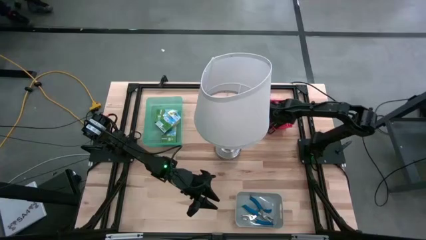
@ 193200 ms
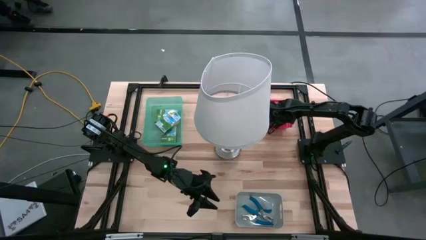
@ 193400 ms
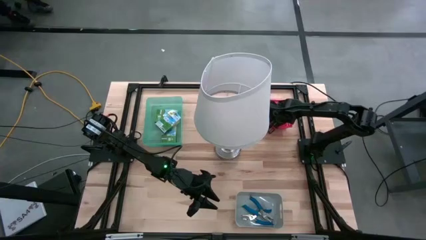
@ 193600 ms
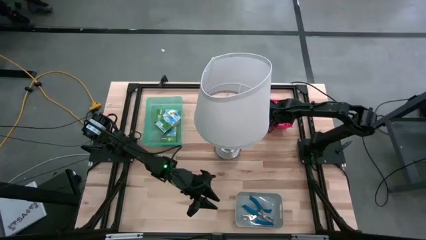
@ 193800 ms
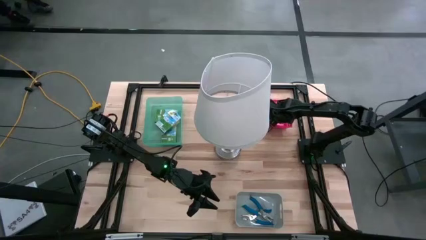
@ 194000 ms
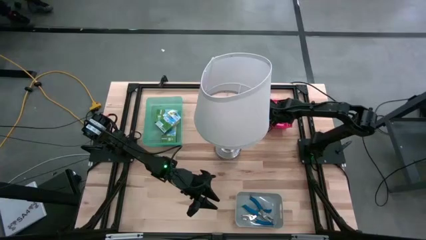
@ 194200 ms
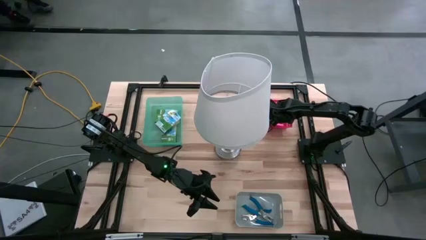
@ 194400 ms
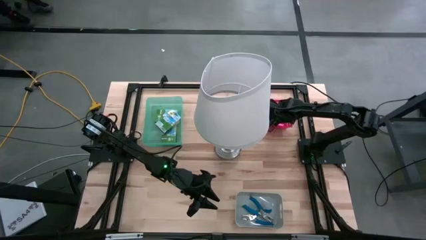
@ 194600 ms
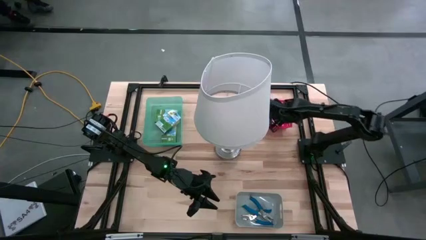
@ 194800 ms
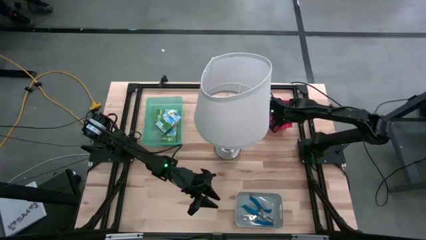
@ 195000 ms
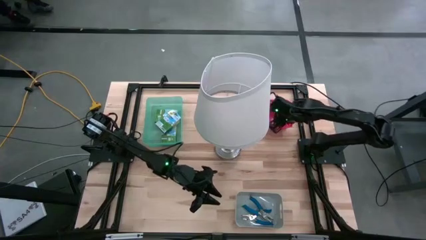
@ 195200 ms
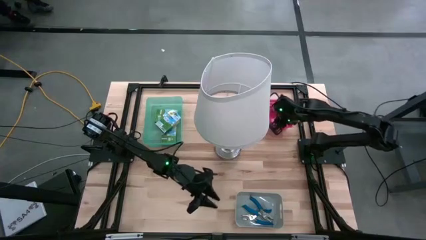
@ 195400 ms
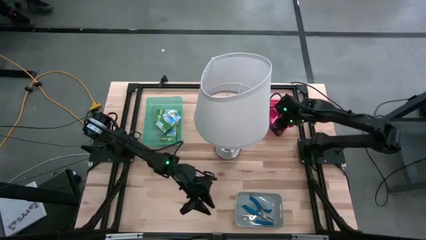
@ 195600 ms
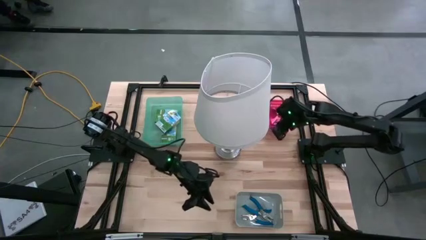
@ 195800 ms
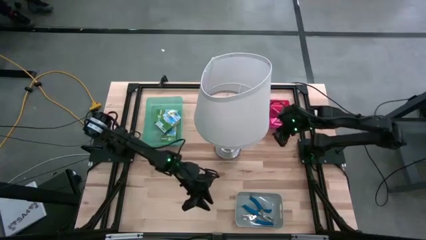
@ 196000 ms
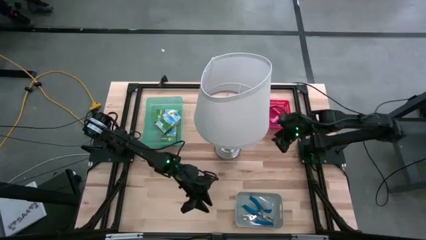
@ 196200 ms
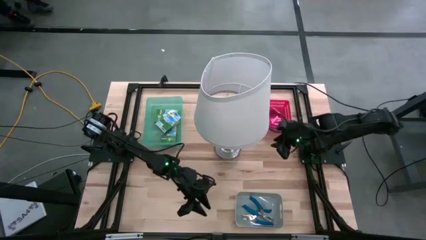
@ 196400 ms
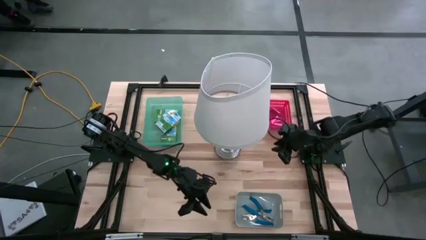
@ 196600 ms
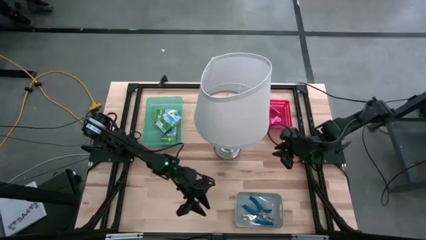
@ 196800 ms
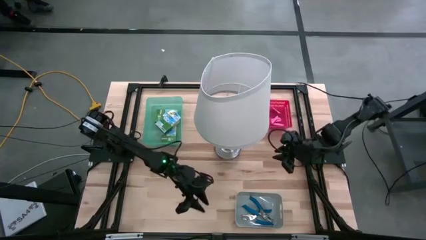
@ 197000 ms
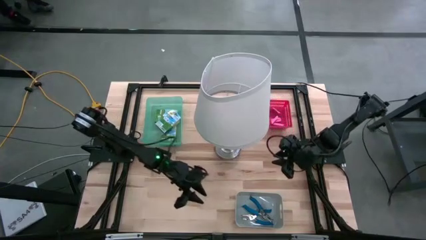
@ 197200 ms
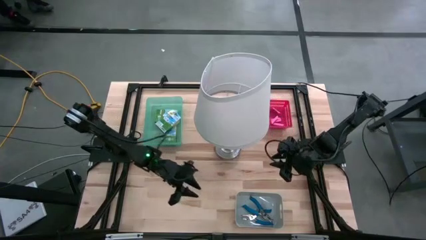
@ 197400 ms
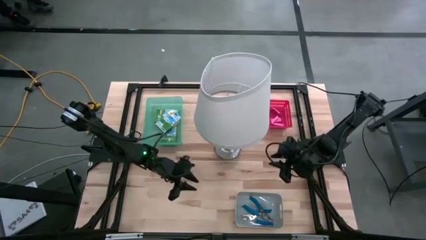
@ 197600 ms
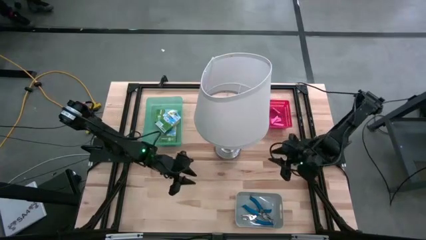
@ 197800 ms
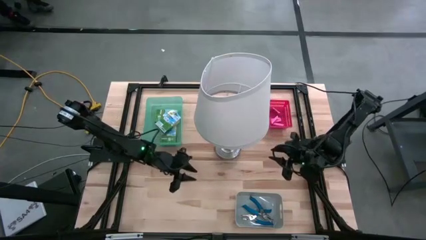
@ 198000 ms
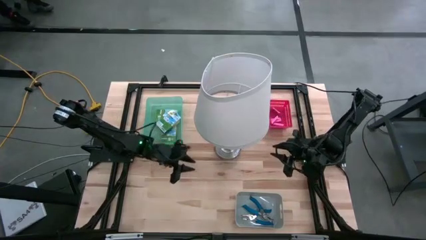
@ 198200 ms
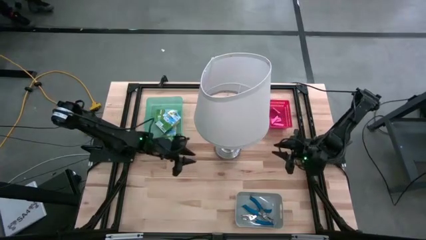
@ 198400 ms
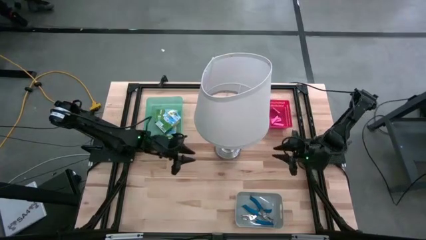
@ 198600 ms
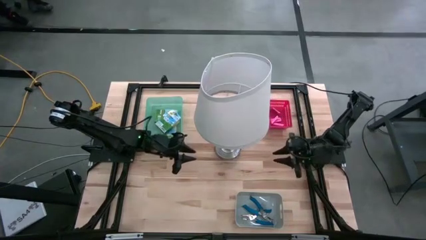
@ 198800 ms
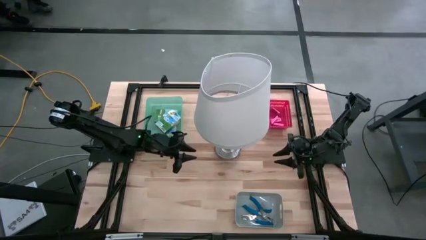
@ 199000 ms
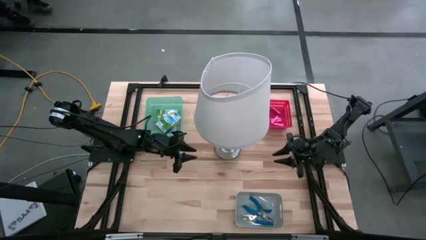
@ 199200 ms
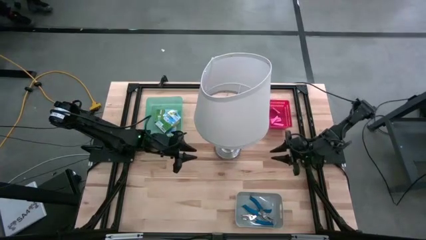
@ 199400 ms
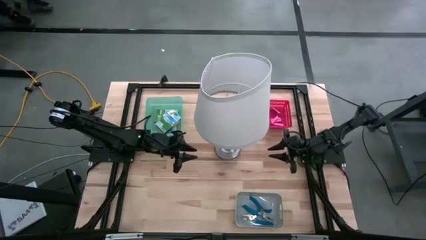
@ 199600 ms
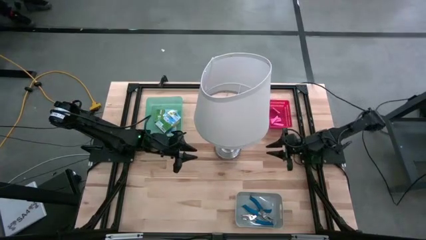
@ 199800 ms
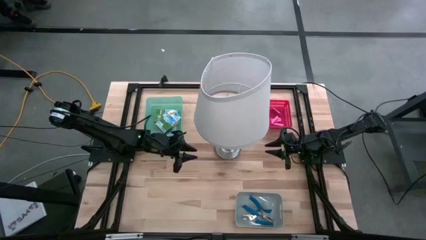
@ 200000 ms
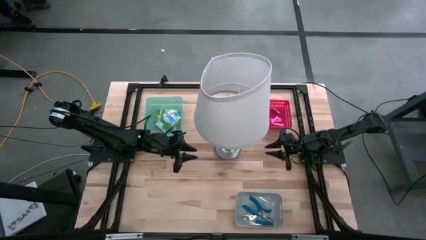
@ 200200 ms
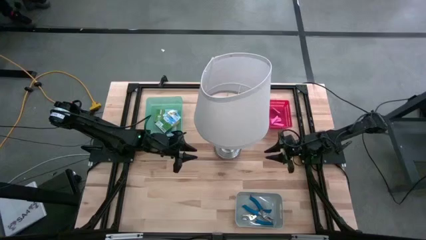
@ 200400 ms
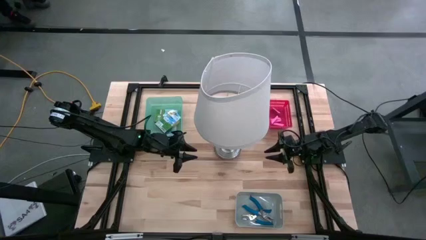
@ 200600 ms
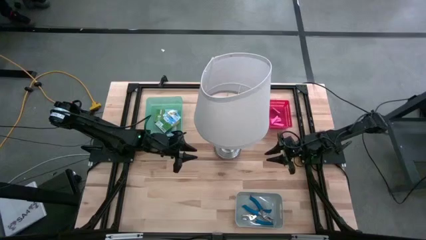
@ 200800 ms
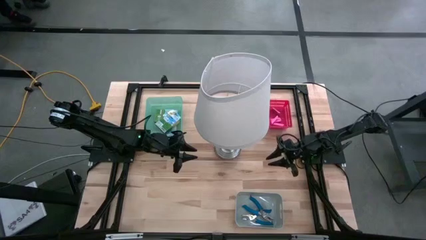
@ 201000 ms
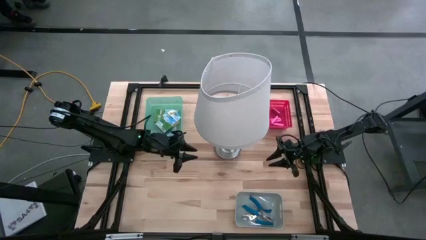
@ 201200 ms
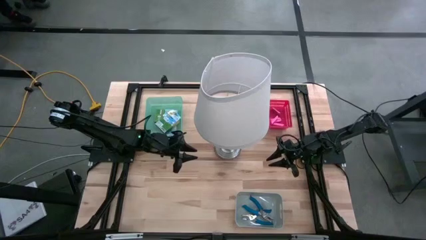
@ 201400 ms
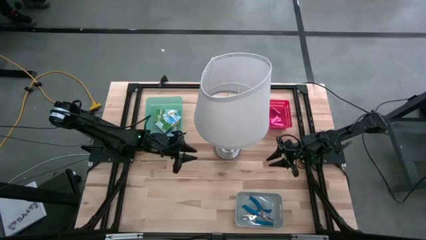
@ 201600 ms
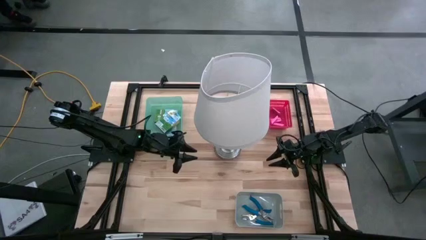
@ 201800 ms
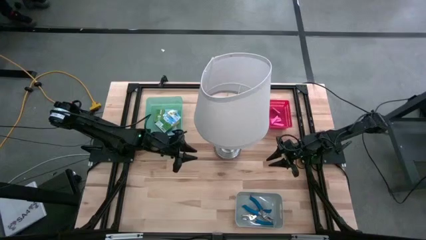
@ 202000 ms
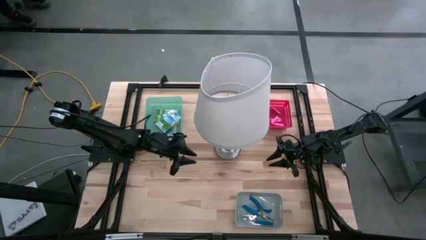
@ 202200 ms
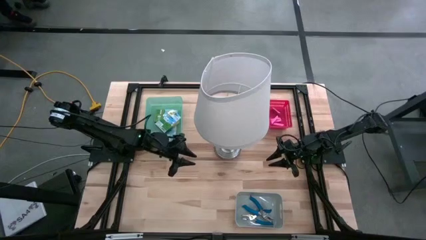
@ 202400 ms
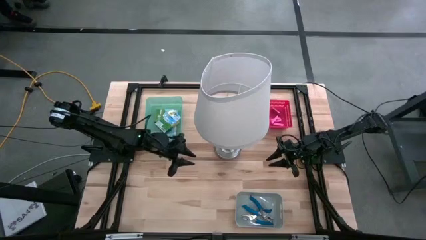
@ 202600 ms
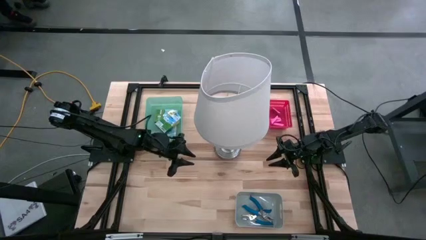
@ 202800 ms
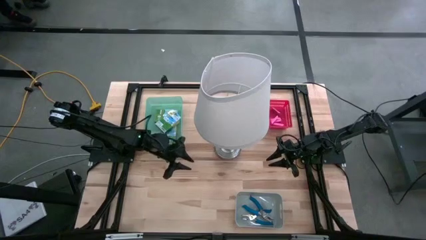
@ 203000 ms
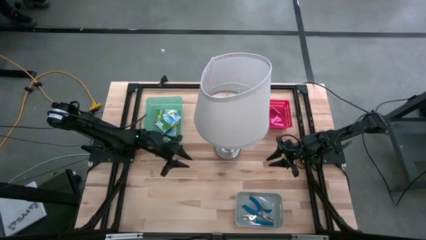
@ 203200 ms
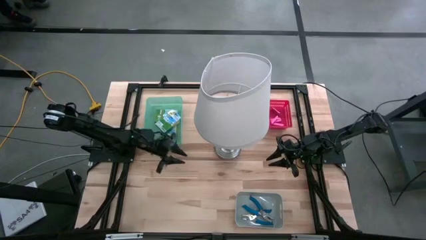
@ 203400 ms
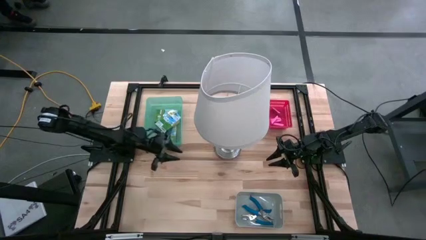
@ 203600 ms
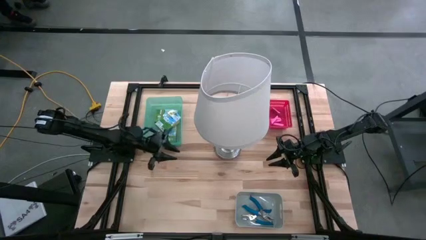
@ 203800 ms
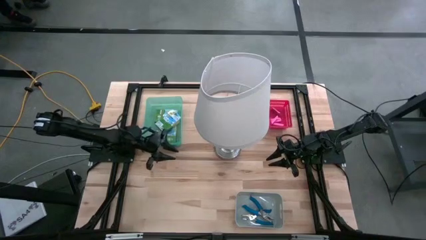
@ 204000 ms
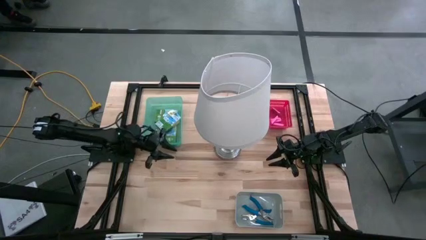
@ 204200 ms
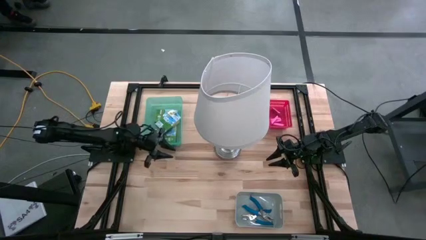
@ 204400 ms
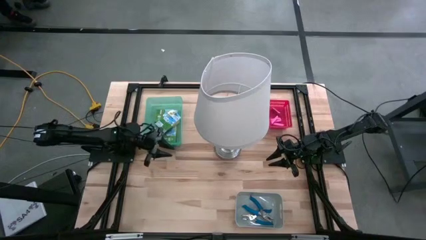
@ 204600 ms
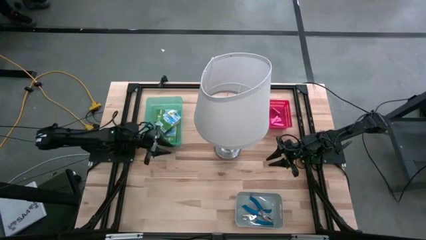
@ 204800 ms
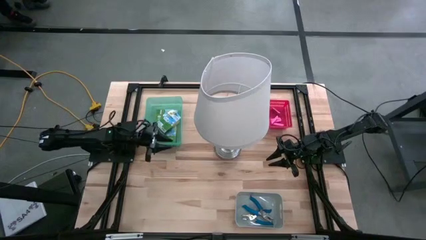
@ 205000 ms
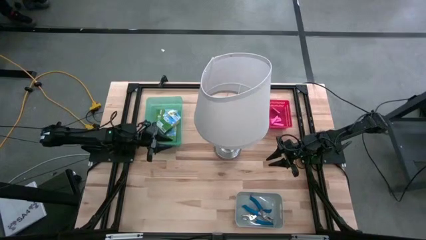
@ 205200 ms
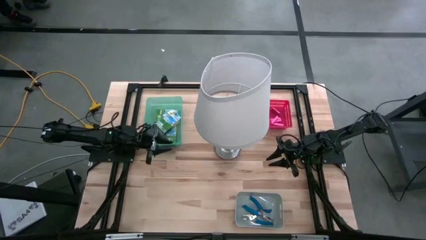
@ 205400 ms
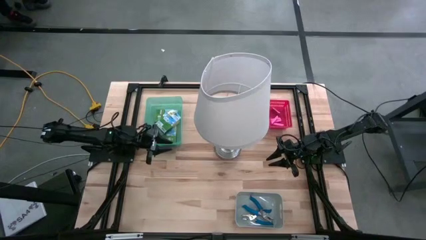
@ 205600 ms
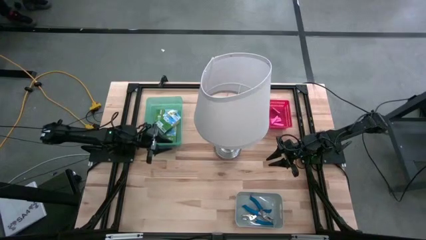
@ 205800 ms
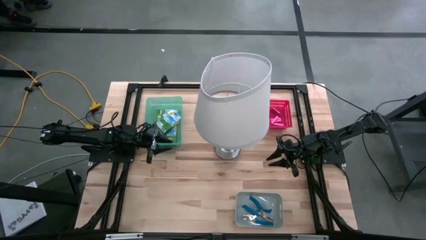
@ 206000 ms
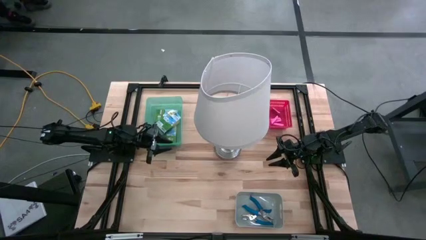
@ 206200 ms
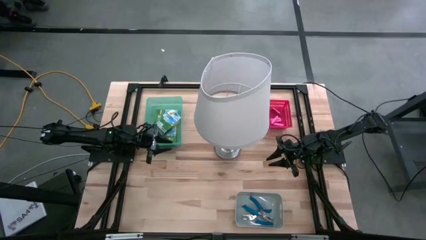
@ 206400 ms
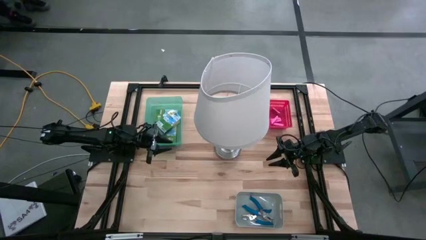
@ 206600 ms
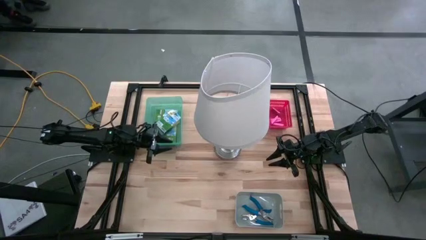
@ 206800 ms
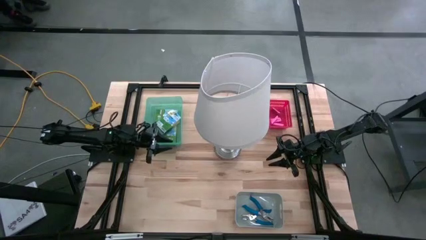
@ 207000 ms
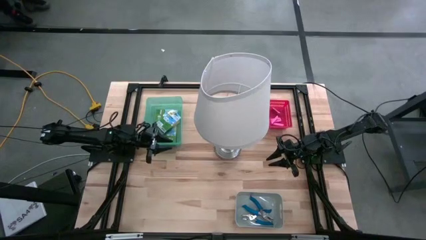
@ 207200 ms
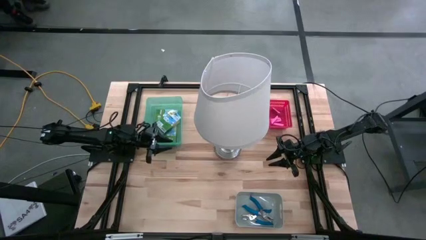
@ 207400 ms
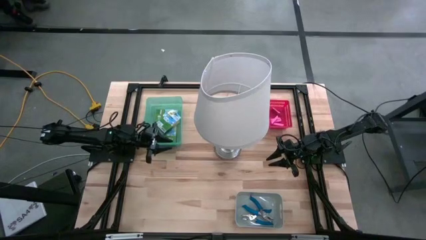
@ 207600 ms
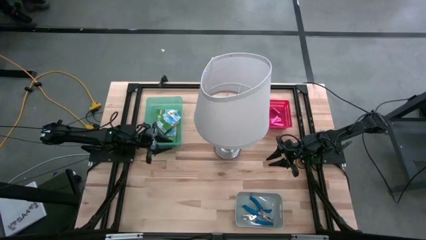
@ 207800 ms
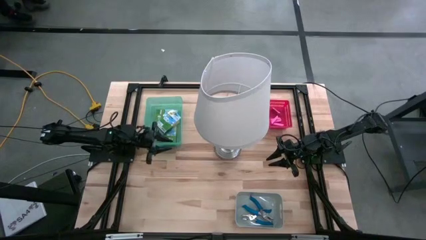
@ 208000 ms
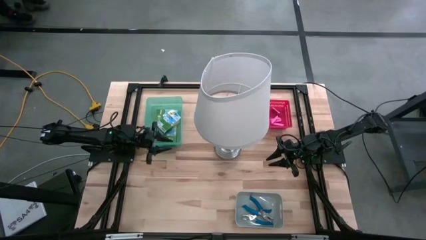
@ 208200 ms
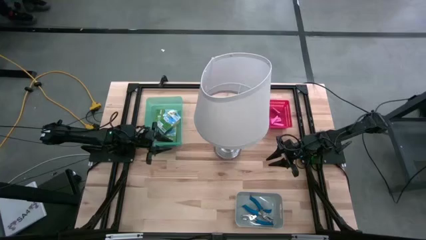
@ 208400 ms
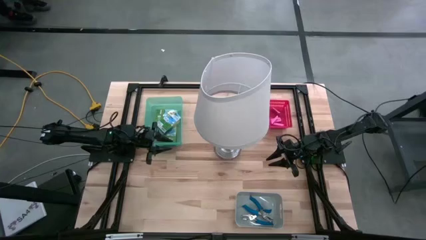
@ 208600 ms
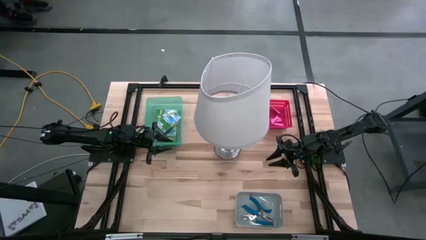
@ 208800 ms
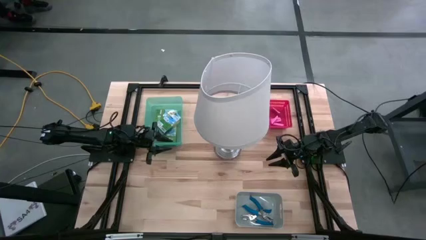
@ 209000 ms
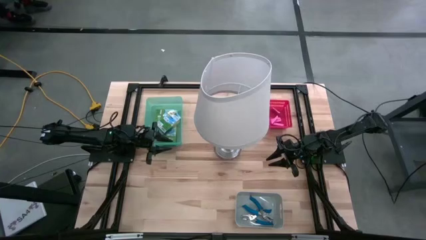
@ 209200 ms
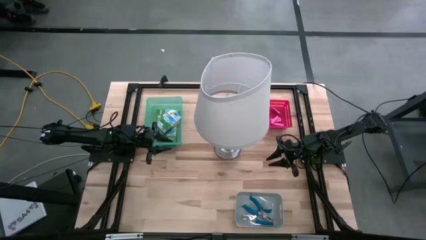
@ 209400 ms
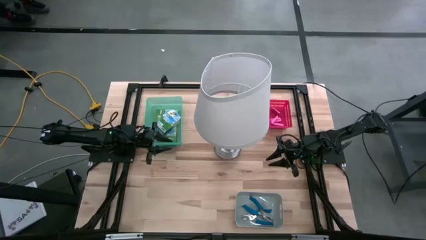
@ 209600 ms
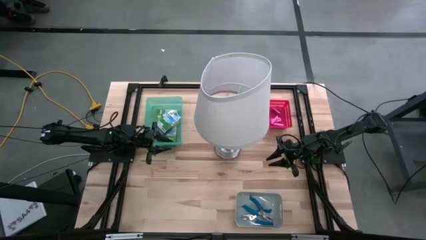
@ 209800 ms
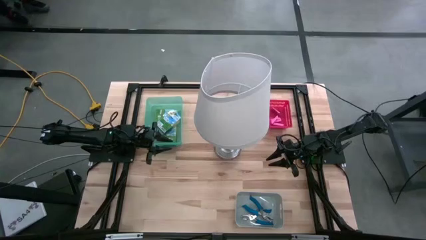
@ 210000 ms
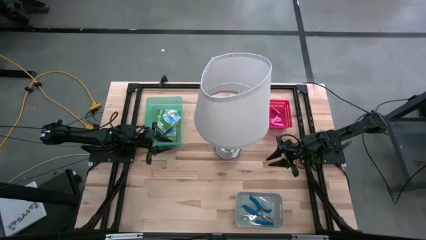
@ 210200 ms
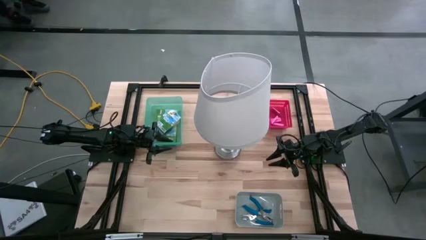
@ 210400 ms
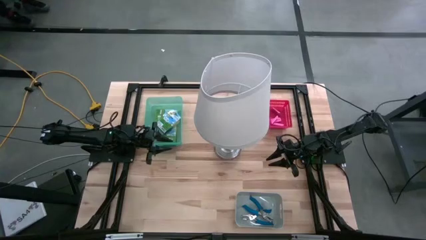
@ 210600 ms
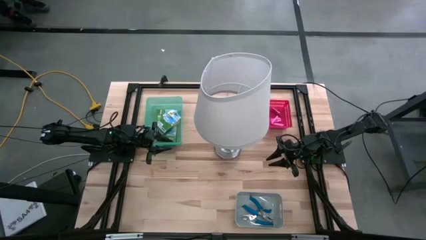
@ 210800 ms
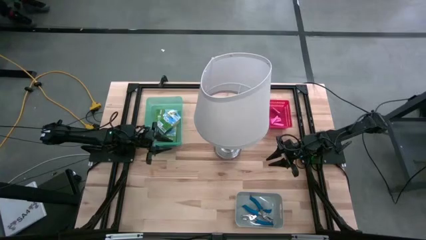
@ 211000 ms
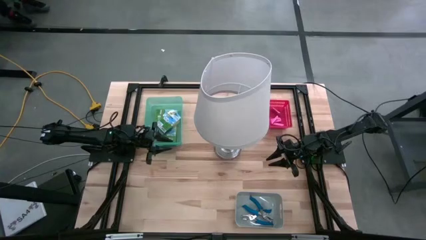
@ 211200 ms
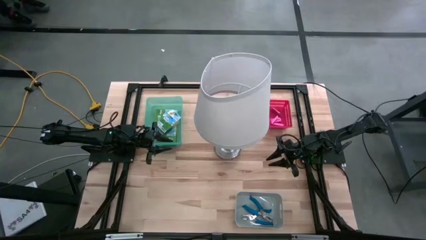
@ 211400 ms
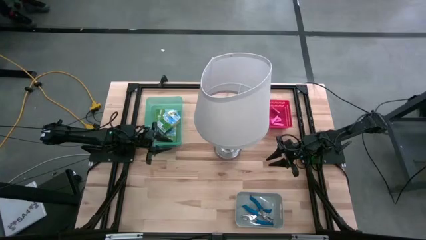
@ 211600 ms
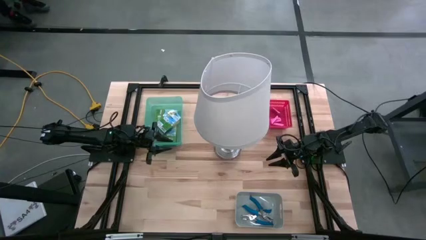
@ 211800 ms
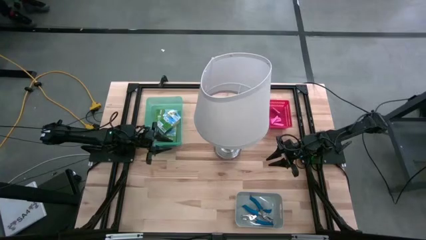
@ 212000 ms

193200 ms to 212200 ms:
Task: Pick & Place School Supplies
Return to Home Position
